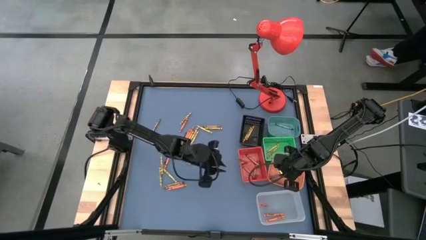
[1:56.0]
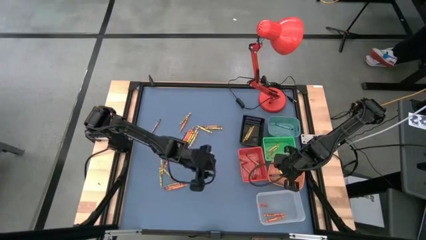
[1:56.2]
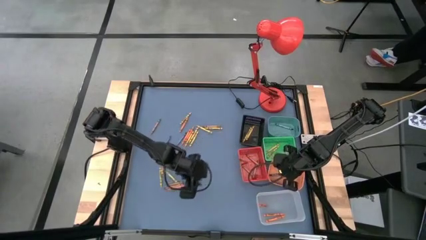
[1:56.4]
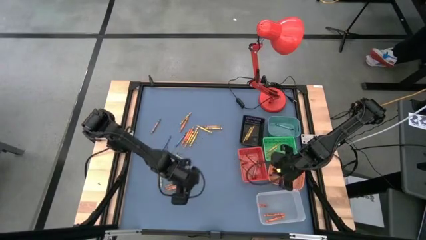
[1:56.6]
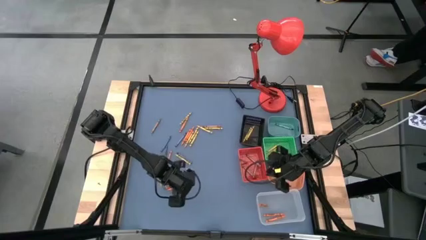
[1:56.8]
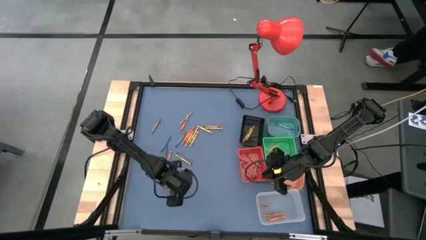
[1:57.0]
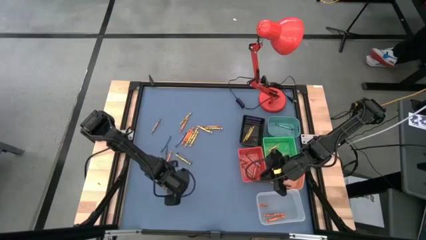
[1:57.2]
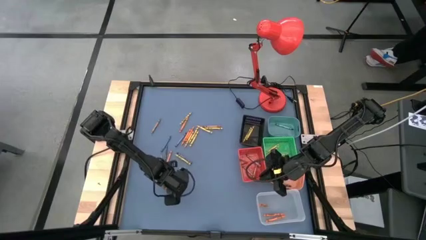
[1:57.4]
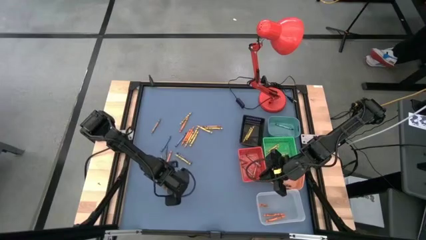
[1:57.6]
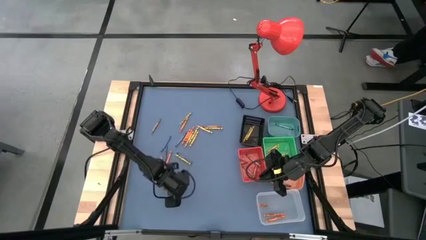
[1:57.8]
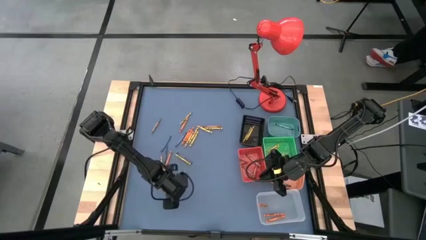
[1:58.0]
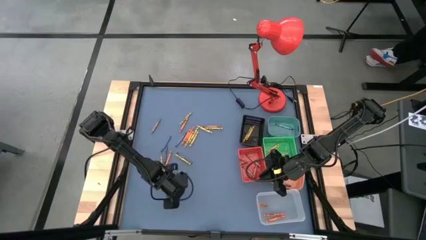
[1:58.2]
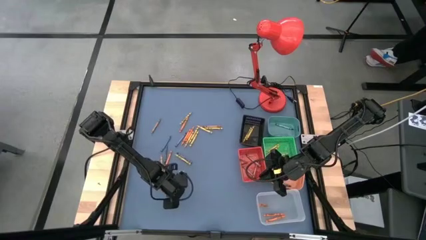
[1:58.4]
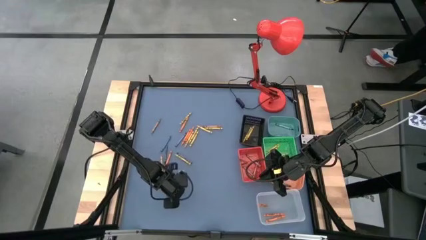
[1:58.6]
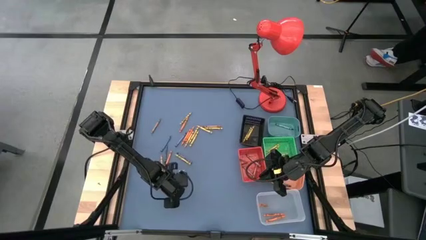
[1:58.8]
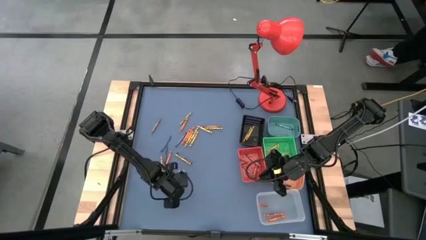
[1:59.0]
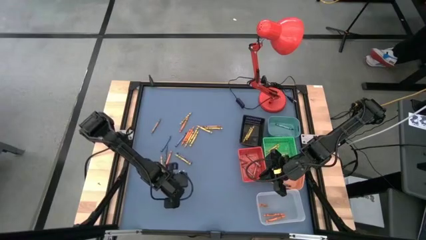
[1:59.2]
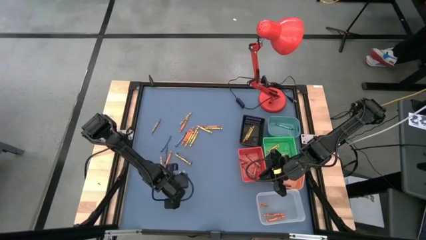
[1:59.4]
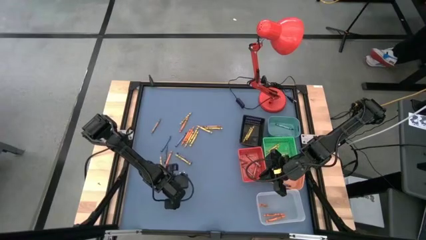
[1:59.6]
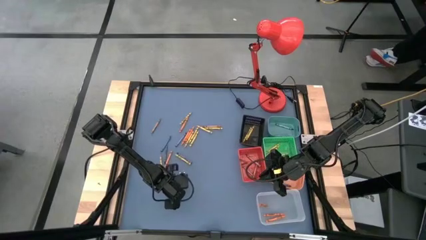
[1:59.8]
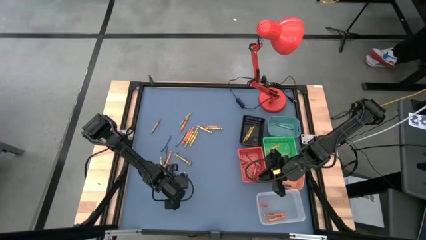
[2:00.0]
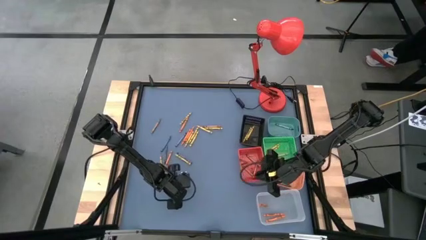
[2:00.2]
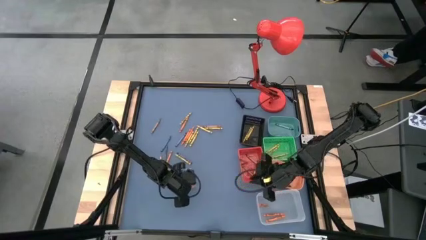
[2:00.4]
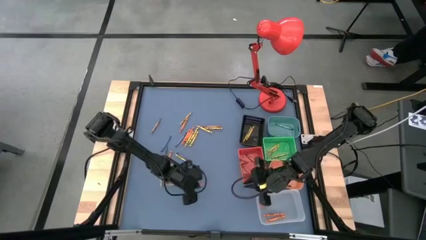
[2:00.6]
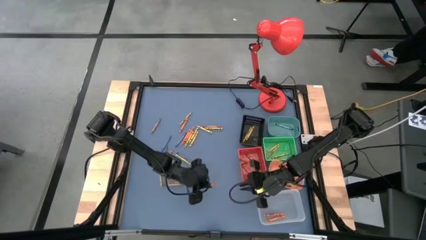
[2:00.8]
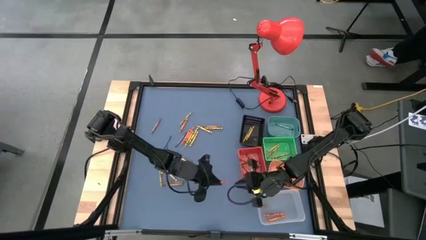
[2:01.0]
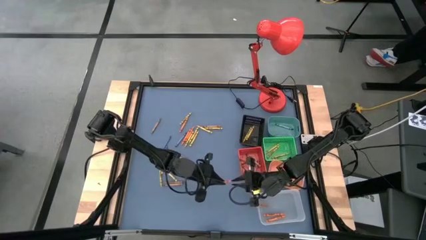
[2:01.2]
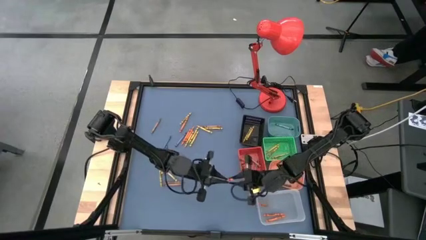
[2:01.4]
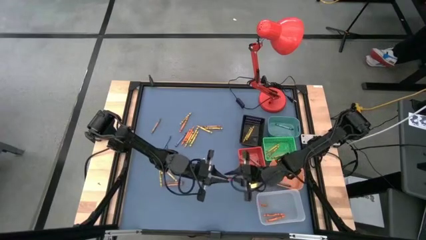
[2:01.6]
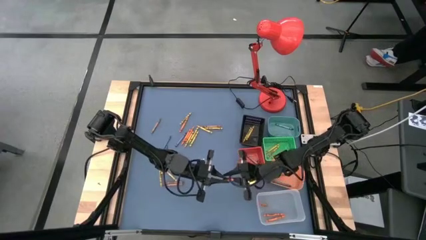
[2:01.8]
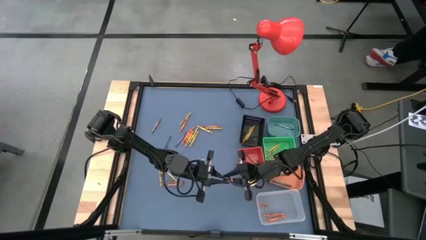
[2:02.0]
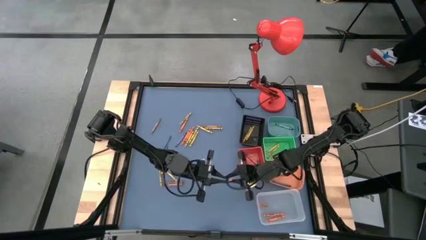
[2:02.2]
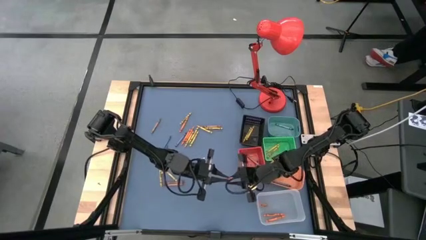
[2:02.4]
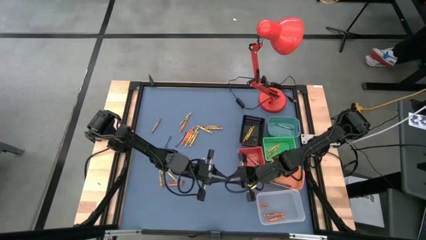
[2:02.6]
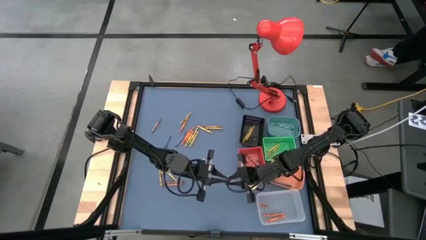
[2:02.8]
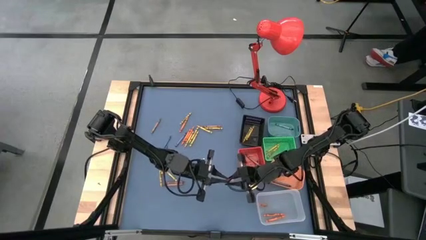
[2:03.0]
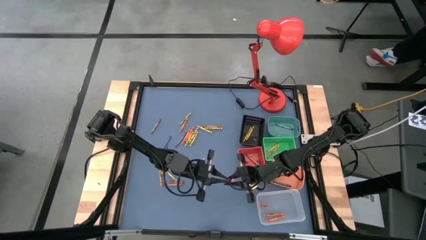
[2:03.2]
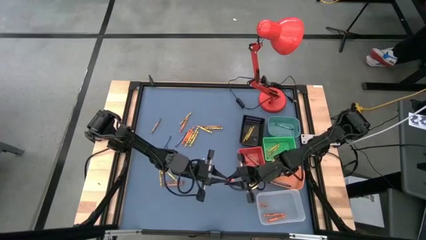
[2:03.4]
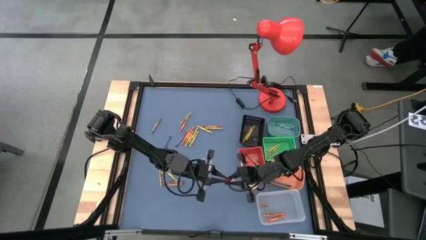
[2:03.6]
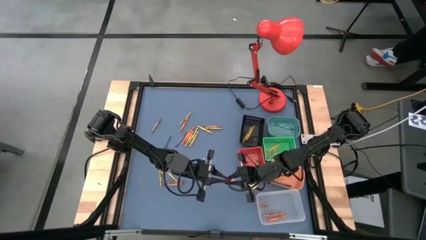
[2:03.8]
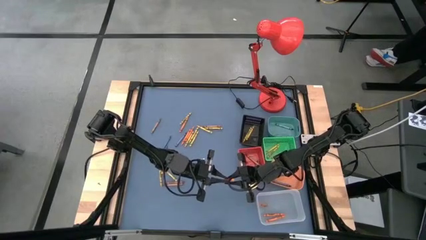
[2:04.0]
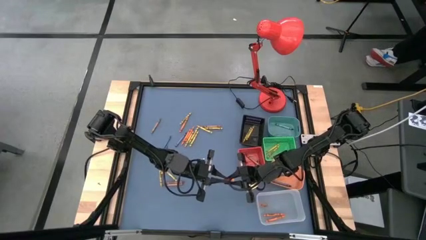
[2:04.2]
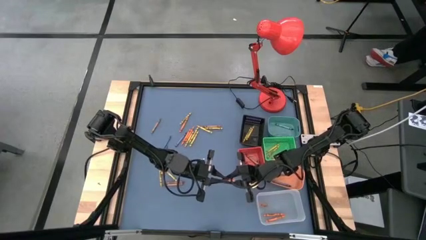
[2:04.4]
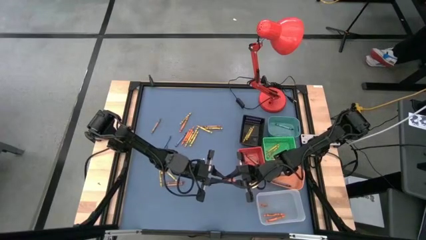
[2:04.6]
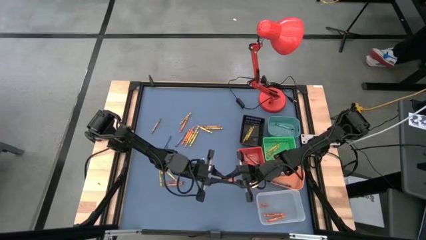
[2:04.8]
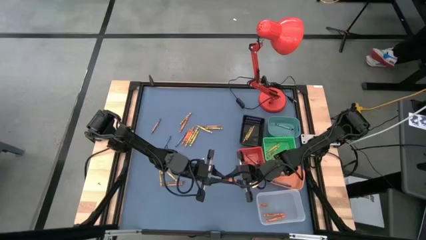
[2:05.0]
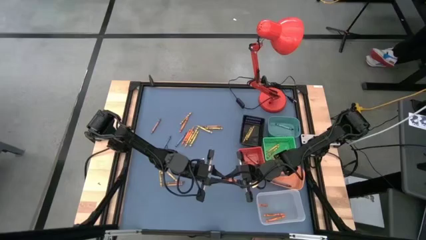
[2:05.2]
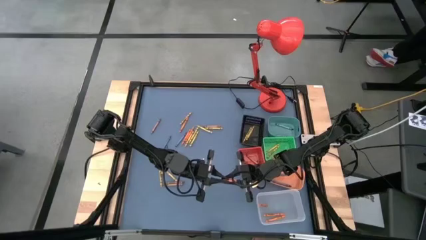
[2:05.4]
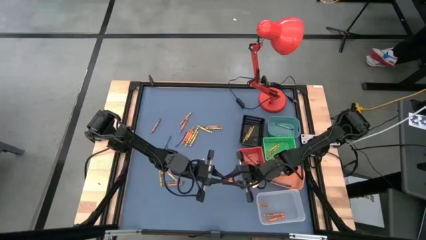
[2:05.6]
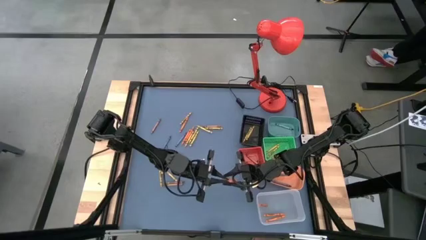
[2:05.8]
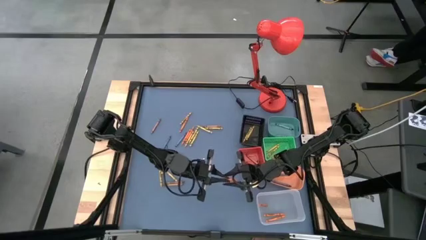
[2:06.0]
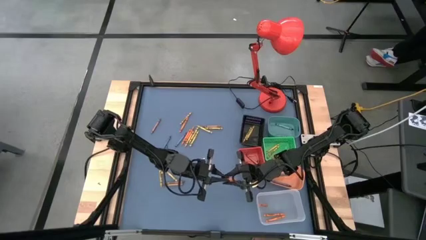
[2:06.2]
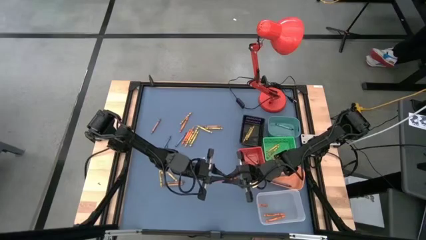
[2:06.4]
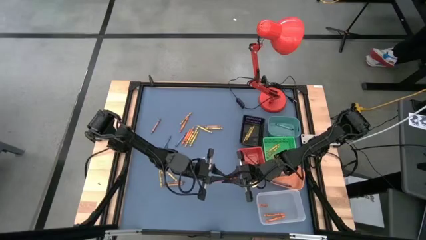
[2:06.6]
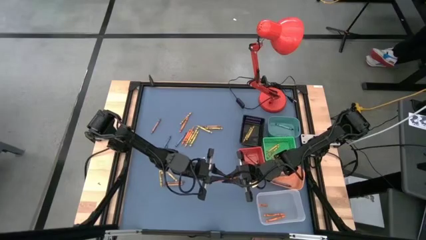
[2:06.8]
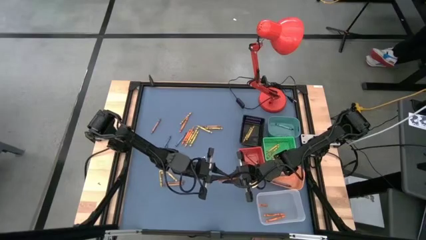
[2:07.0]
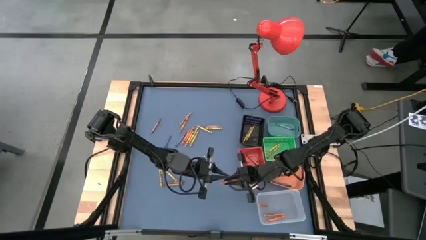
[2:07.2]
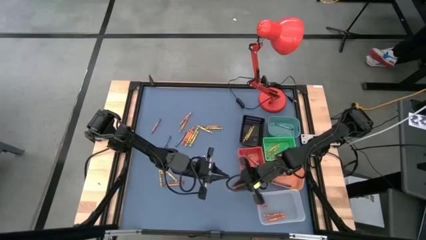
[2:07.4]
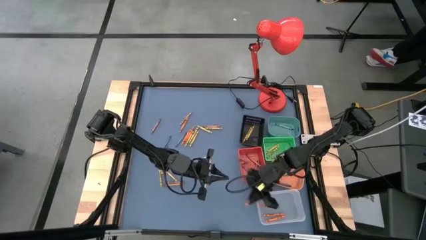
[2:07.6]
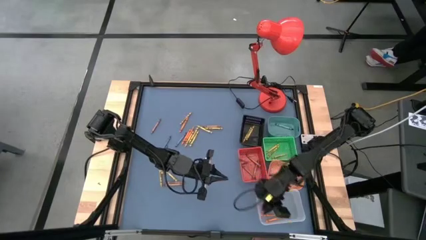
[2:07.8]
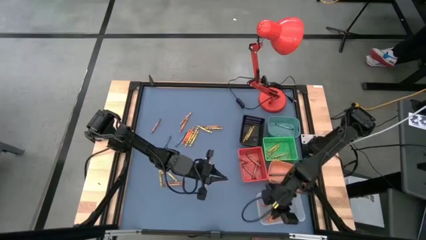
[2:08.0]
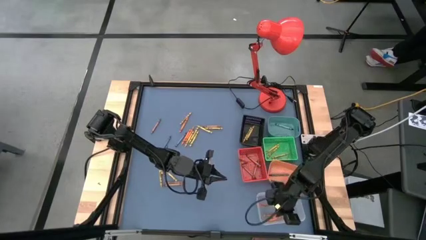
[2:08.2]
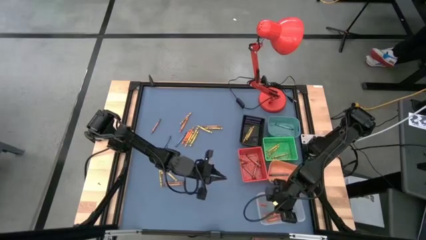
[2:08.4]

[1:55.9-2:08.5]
Task: Sort crayons
Put the orange crayon into the transparent bin

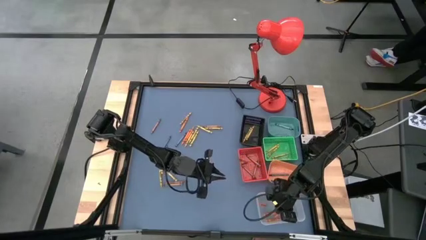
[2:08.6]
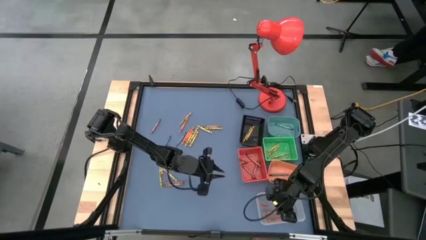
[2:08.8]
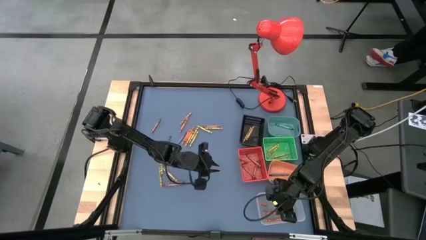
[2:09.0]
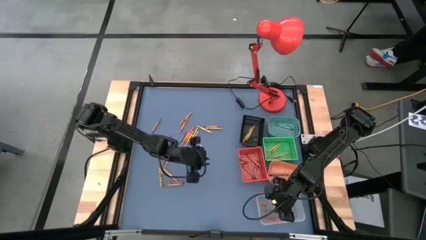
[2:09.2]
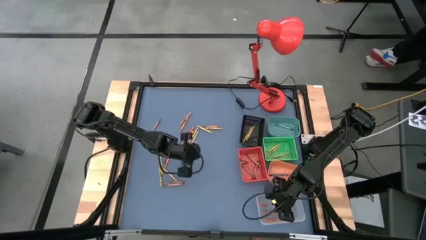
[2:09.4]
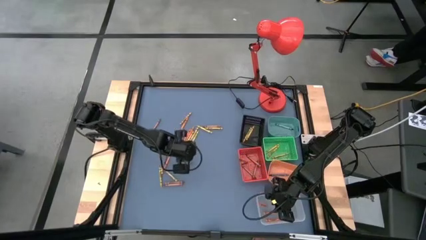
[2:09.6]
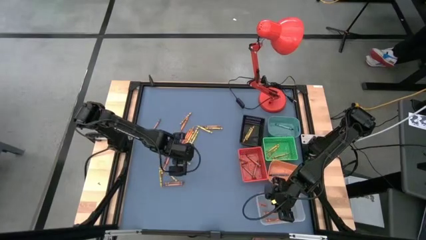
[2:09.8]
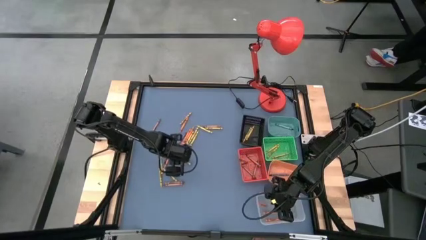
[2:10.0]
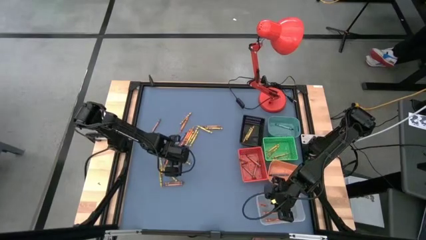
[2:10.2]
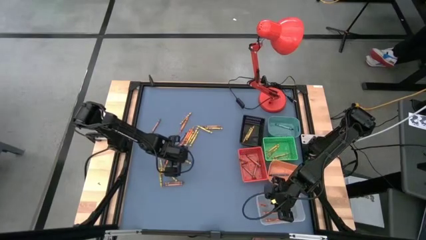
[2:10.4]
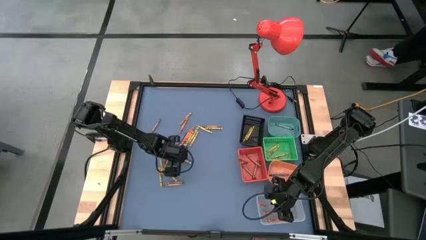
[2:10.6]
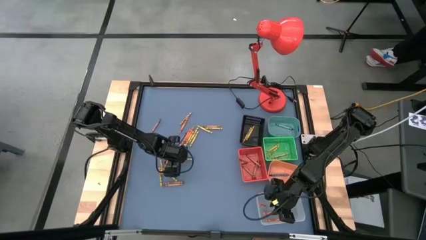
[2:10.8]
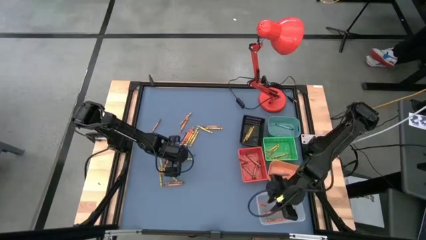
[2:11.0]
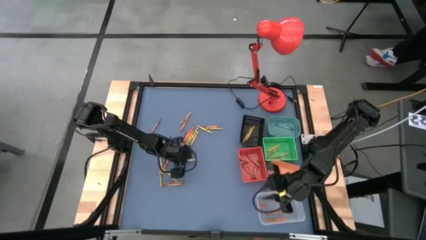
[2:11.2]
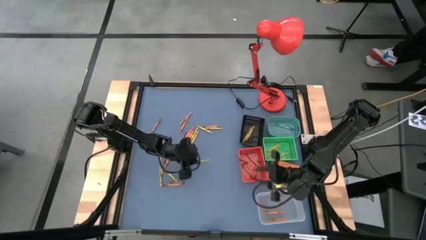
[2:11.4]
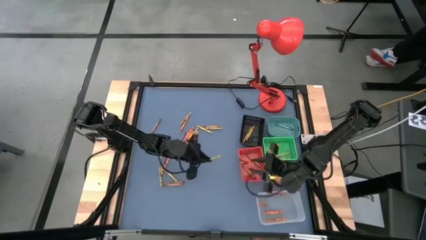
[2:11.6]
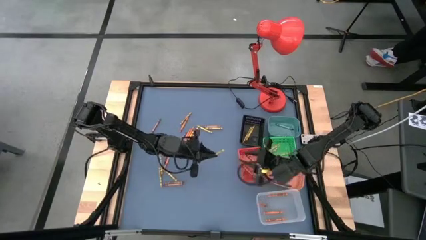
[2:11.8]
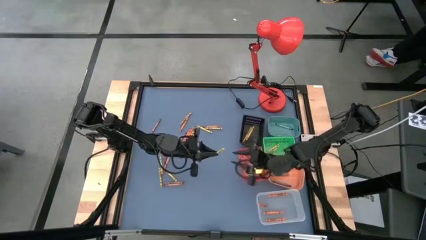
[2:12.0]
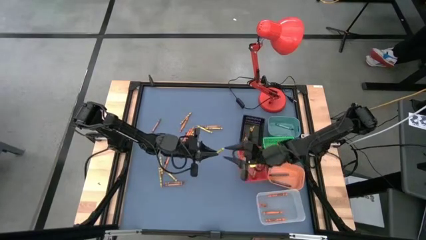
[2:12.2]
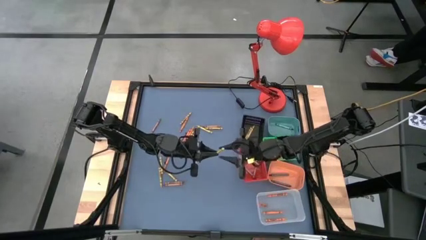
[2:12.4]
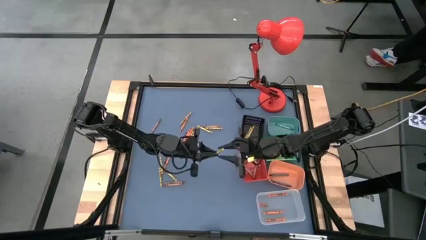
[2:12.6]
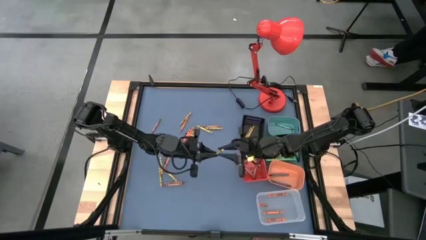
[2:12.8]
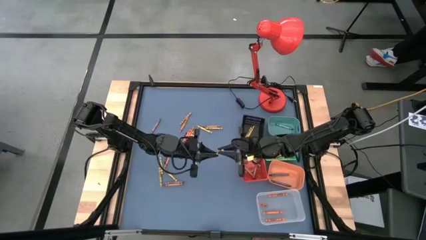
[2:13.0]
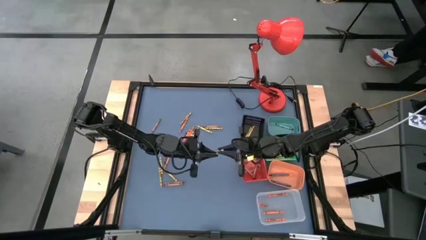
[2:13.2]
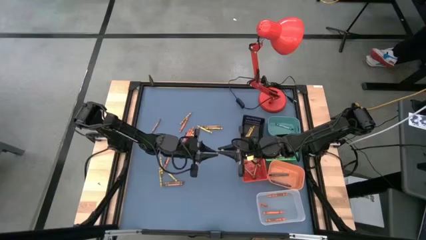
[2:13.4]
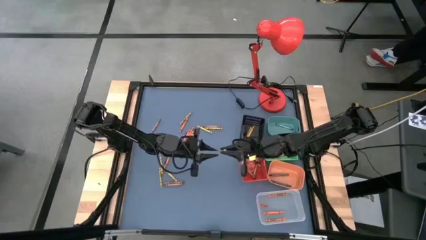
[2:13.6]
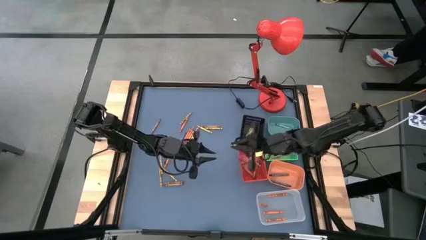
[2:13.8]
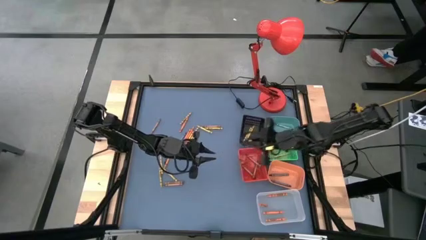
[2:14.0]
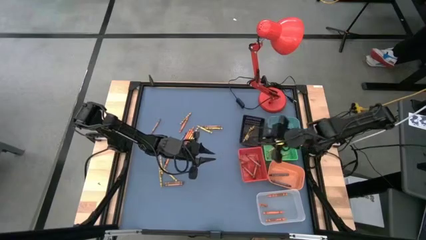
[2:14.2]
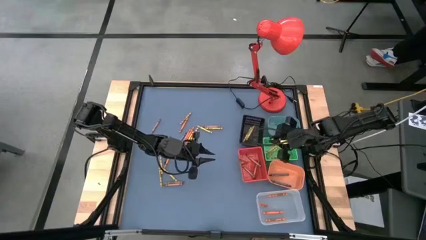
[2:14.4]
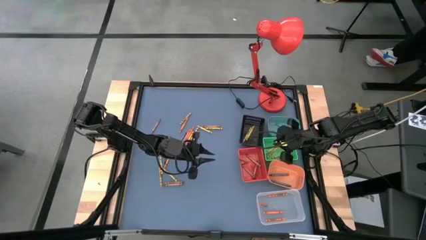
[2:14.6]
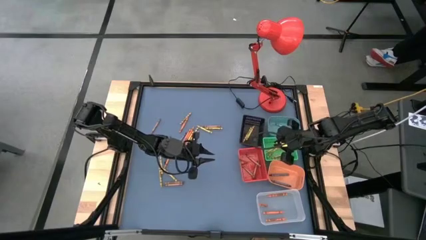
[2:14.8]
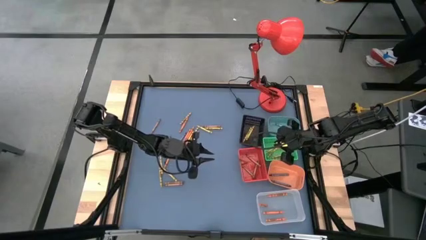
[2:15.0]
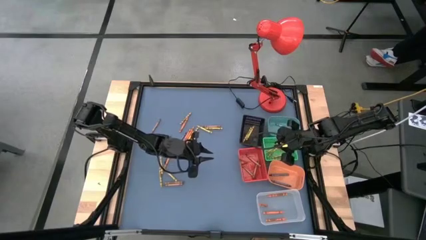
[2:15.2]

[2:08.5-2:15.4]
Put the yellow green crayon into the green basket
